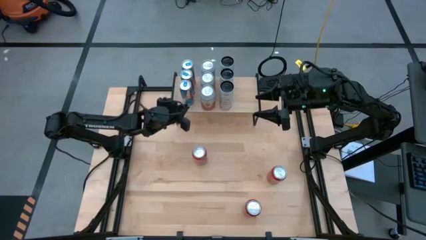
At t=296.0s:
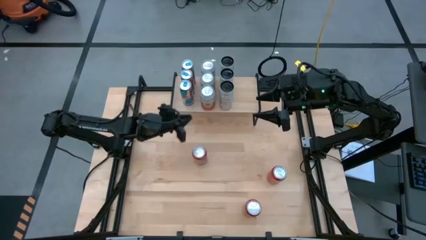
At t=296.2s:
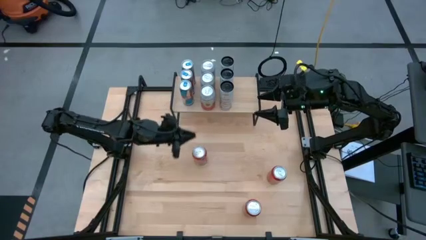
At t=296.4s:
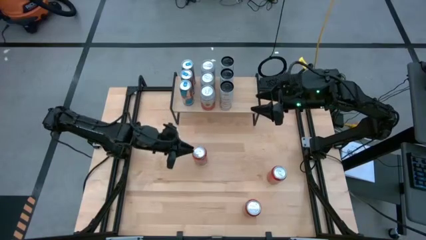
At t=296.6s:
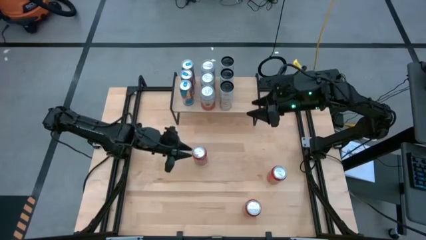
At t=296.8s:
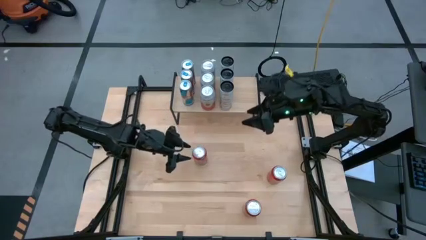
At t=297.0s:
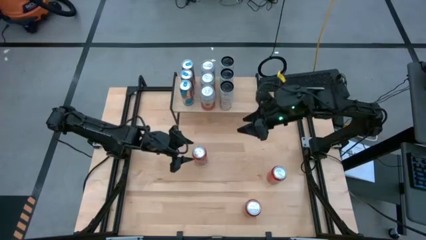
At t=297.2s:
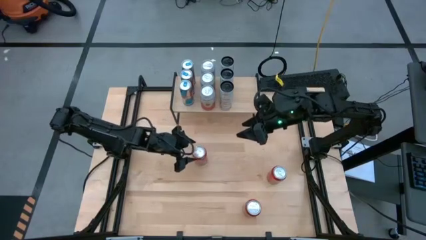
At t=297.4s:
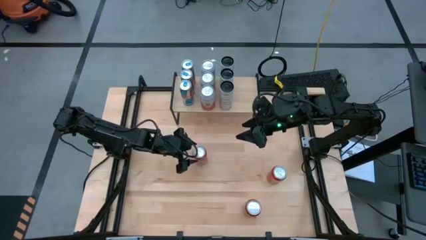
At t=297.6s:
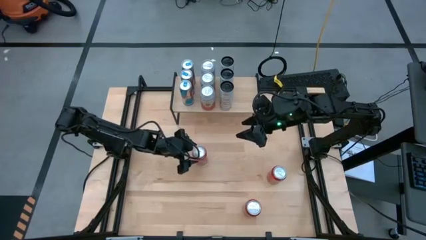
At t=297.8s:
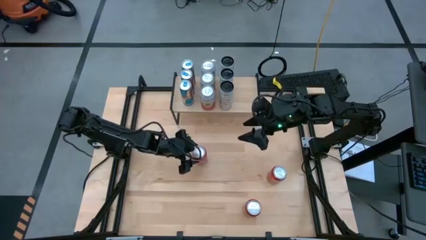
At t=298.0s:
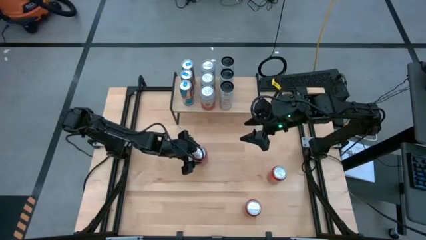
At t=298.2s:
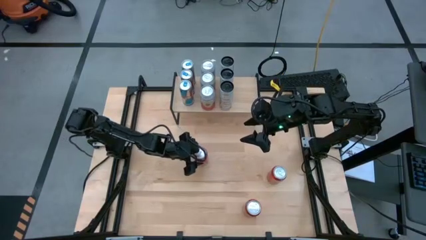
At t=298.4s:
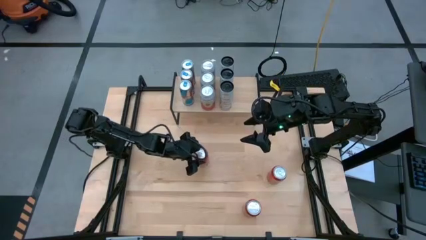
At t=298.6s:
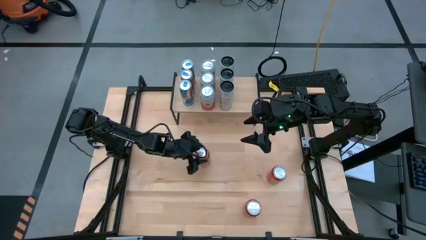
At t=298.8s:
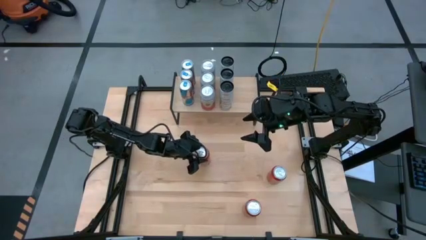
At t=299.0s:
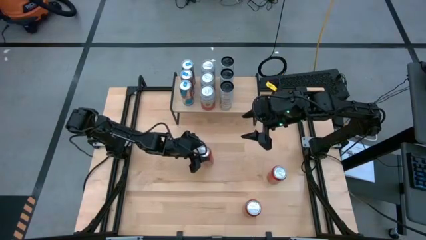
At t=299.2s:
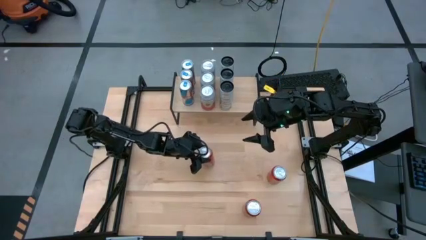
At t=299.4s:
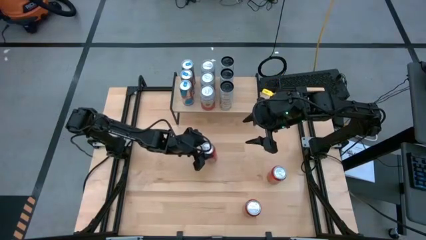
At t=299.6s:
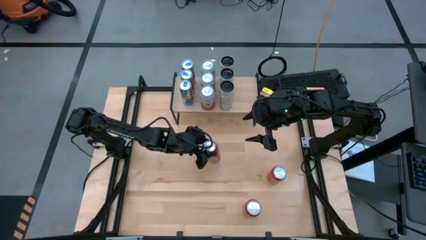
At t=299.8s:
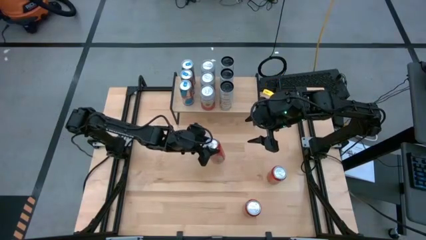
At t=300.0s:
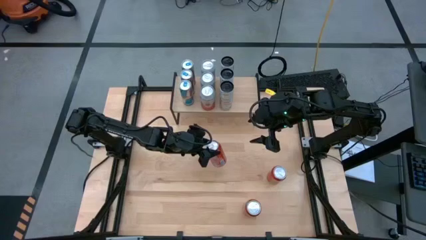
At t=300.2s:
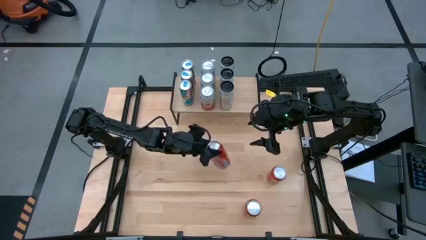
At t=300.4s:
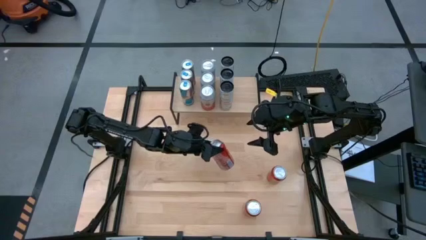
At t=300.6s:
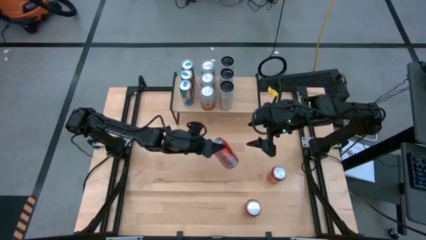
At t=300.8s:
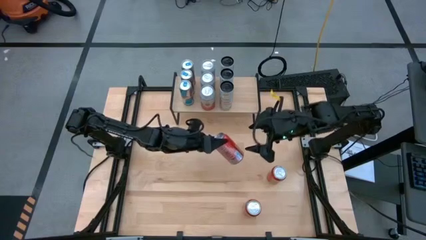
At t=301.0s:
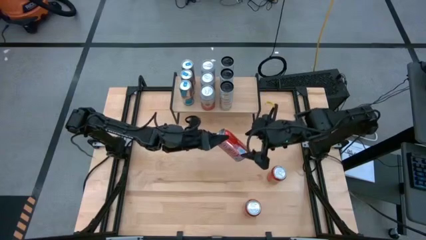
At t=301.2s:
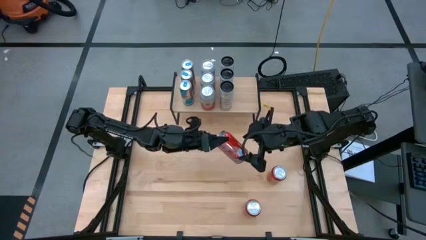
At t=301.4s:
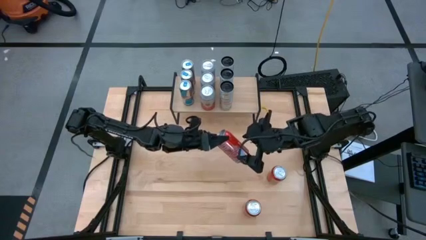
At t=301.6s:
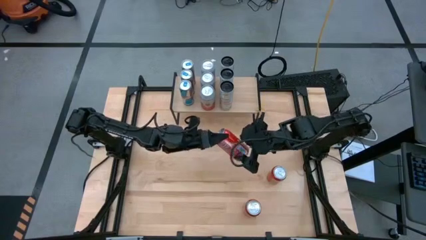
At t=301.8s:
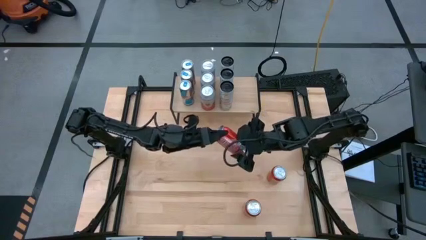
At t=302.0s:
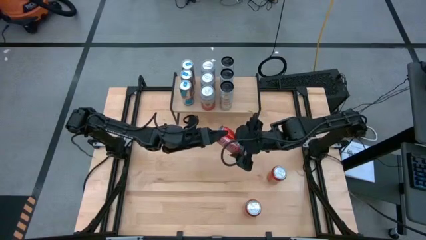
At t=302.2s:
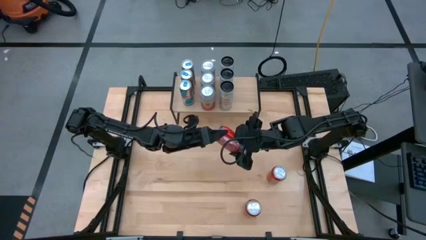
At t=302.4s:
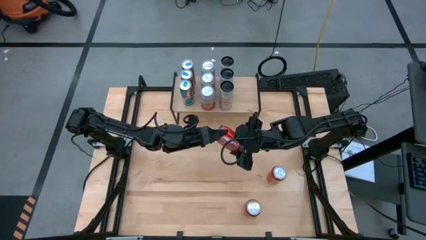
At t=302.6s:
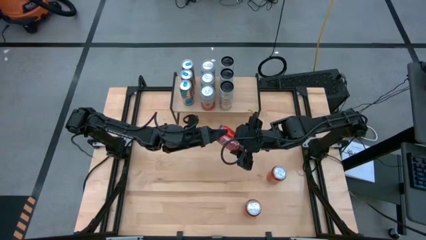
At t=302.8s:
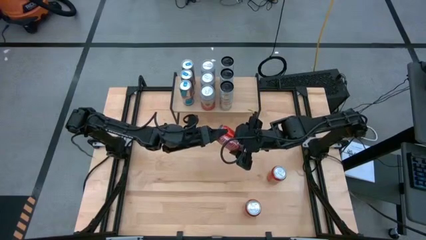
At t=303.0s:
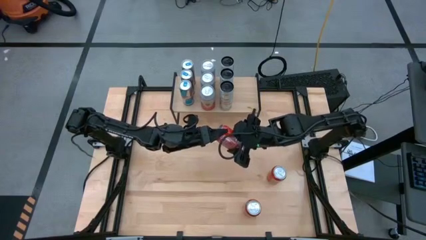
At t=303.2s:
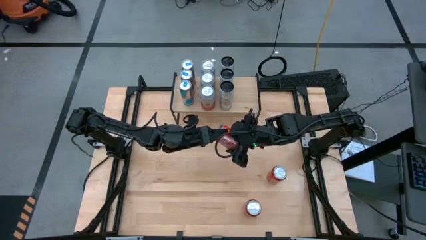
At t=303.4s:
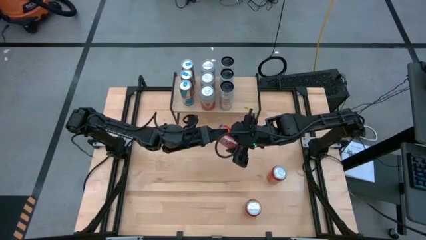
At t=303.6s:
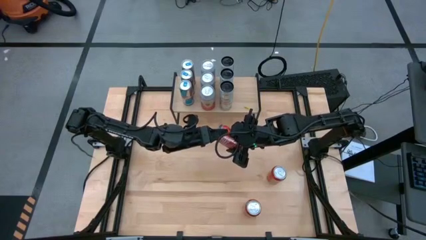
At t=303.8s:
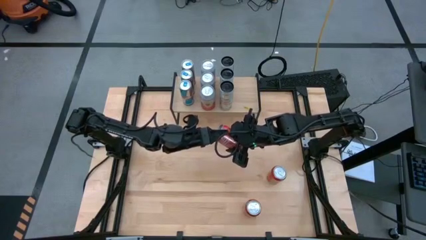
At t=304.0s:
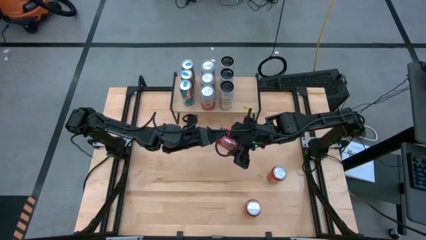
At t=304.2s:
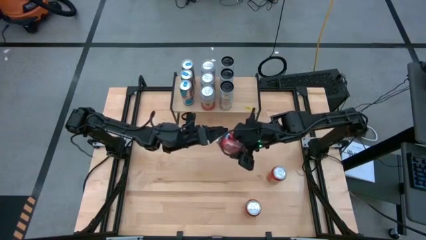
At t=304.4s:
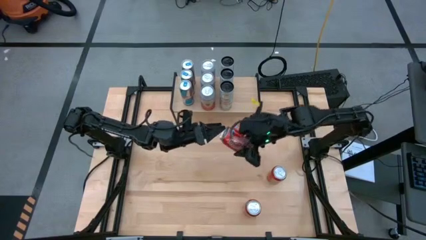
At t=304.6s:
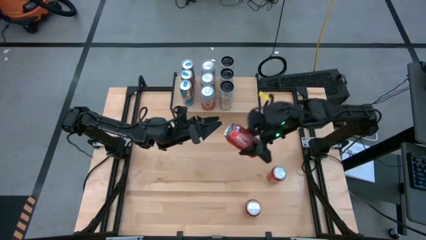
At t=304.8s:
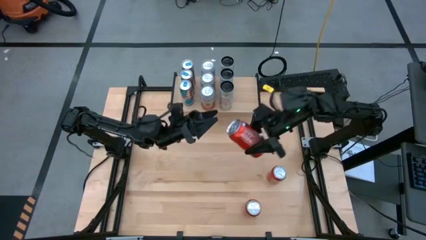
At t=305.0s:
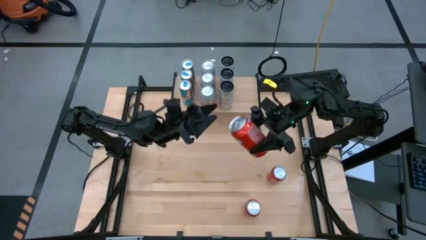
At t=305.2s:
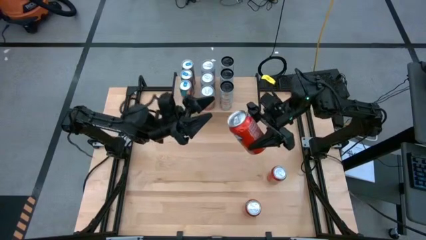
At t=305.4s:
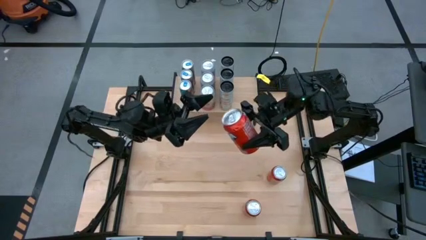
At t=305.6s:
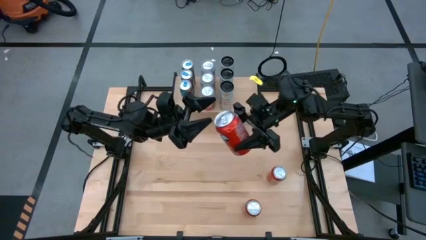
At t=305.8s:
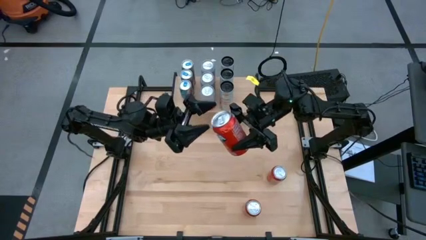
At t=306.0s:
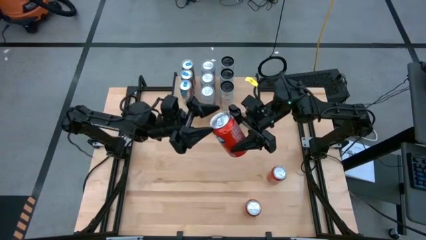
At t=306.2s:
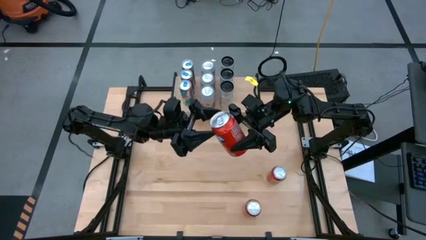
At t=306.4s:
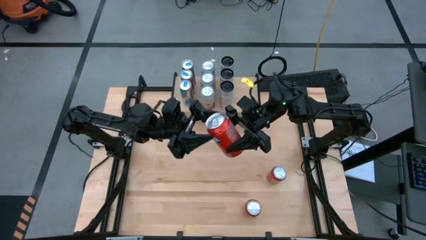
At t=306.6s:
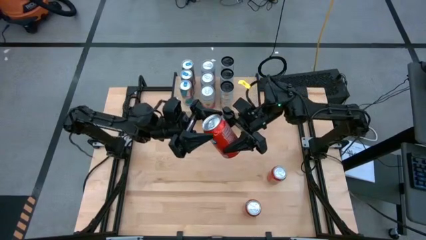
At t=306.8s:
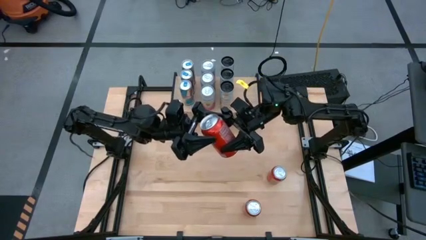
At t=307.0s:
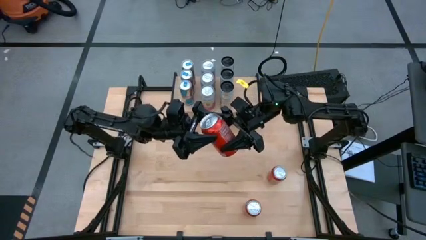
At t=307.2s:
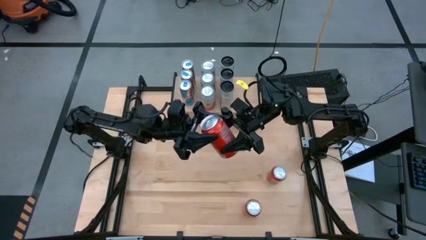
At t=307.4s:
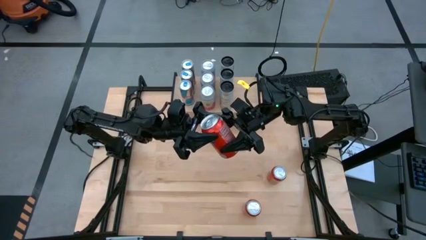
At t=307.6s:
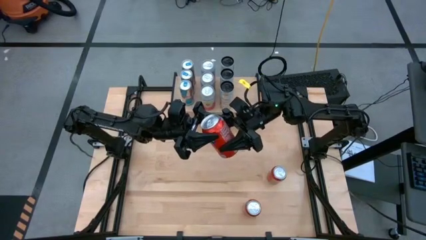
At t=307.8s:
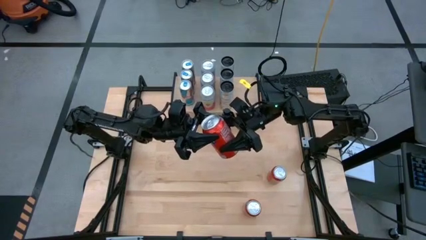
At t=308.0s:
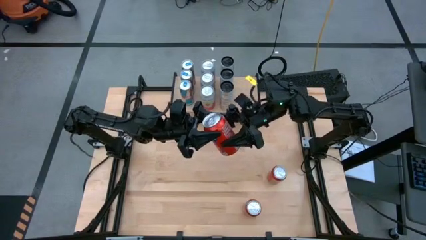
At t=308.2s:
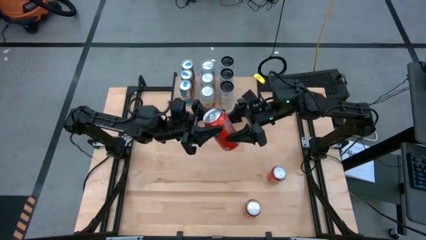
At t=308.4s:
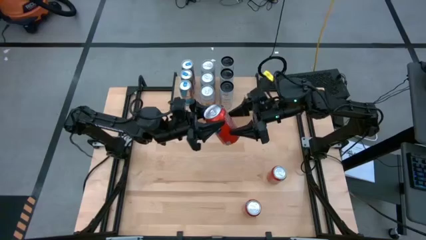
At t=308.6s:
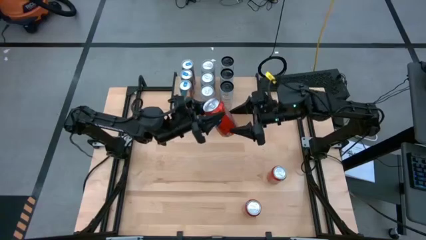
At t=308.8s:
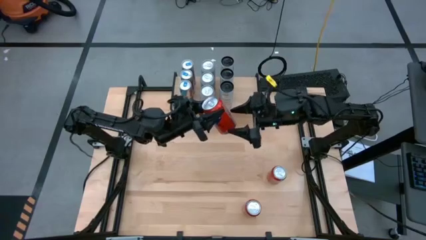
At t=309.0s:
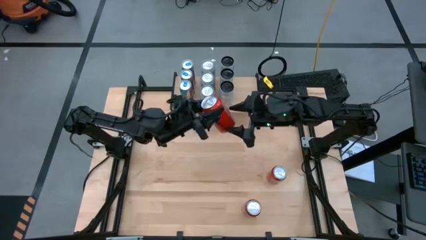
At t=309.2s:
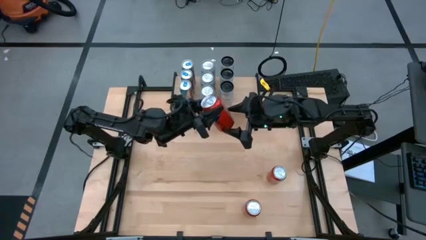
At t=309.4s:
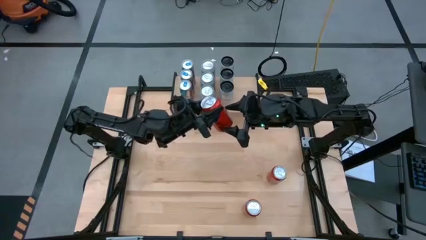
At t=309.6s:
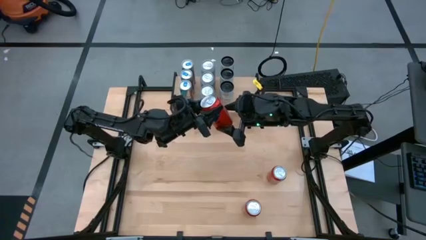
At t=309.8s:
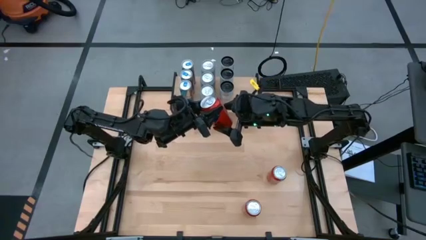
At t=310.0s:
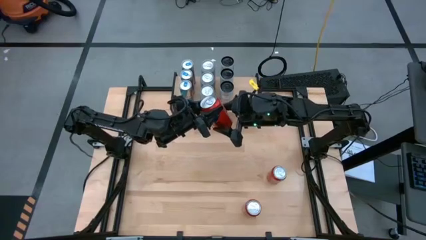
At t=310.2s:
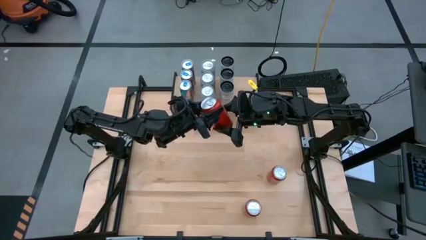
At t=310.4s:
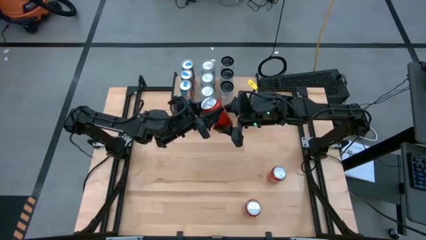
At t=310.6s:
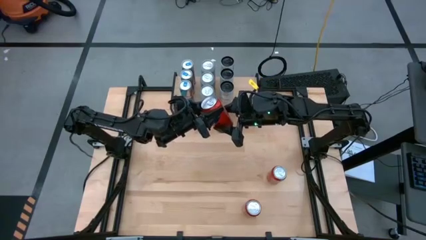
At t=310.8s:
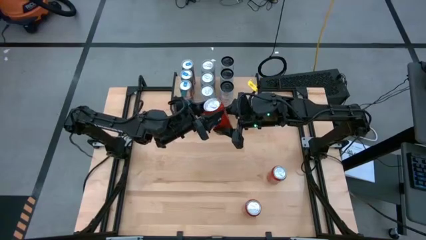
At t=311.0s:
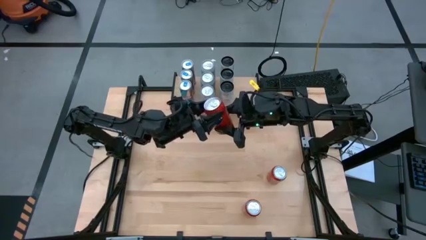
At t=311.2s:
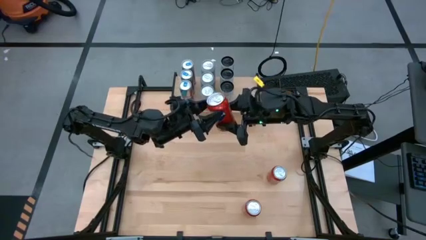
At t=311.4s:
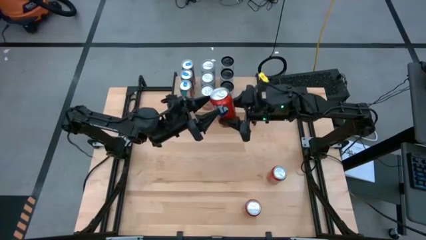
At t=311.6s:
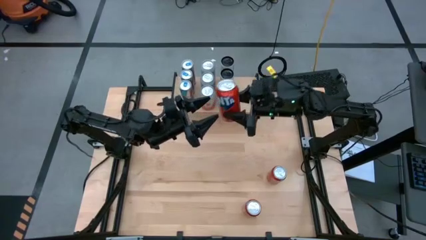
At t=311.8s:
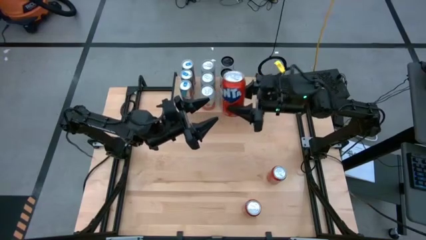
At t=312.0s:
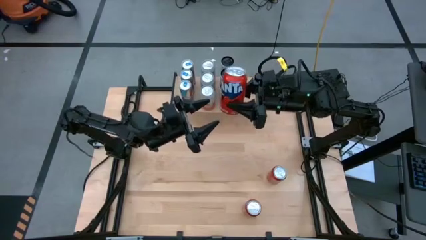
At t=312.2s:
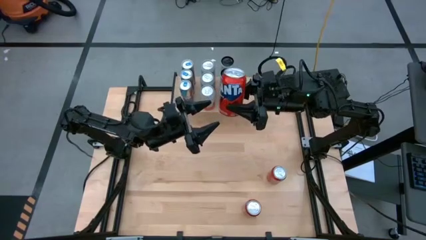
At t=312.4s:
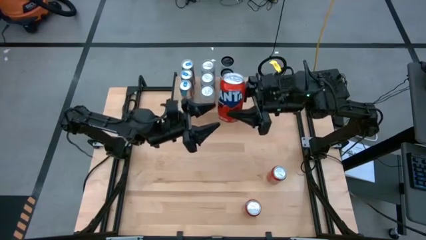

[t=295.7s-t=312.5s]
Task: Place canned beverage on shelf
Put the top left red soda can on the shelf
